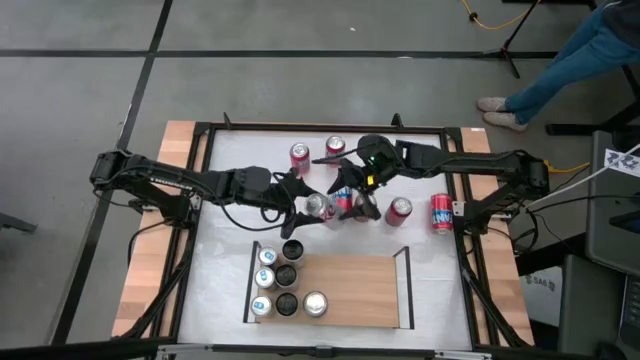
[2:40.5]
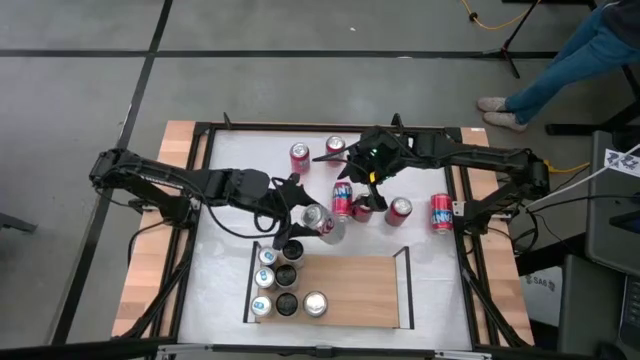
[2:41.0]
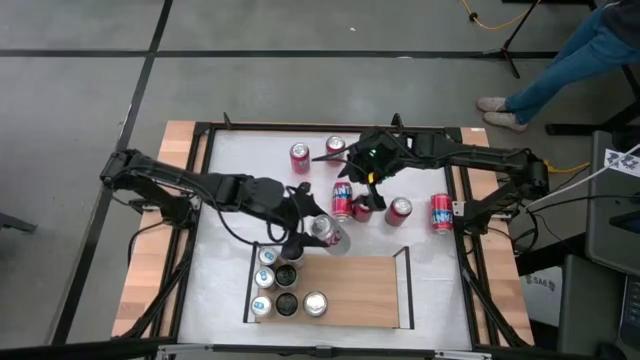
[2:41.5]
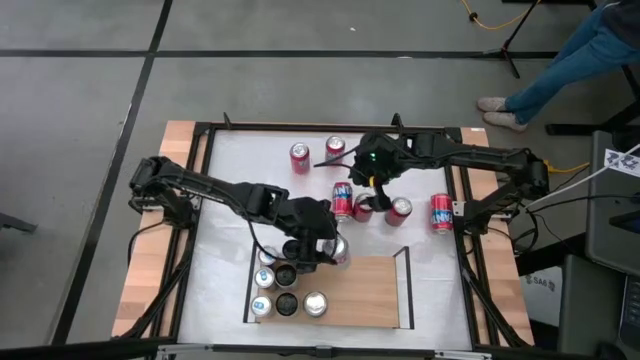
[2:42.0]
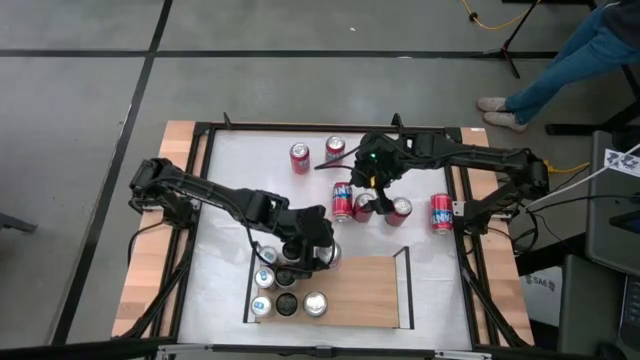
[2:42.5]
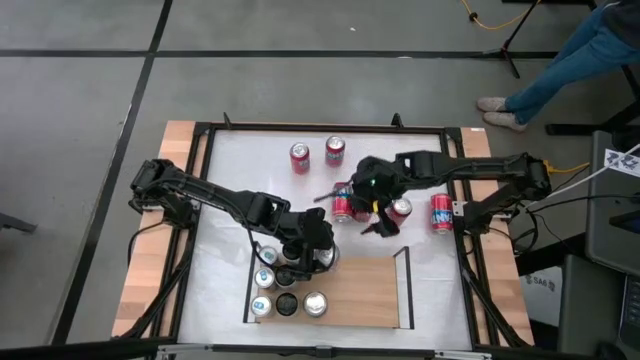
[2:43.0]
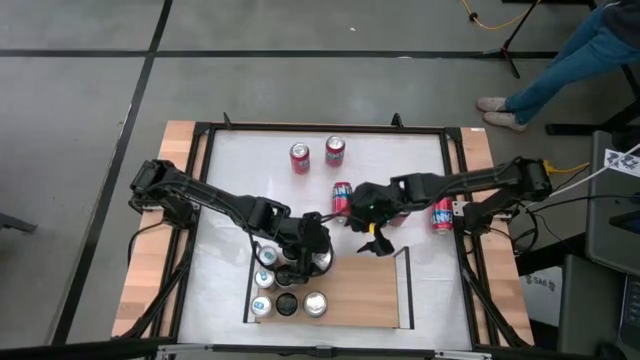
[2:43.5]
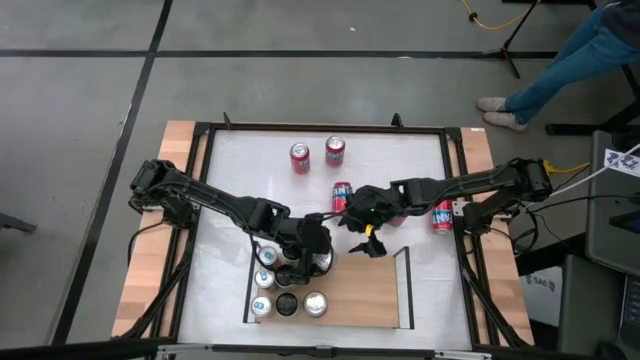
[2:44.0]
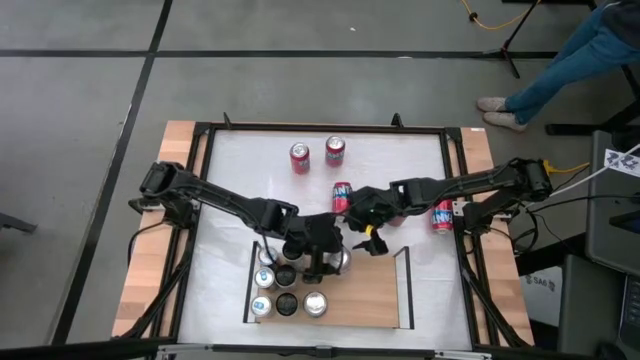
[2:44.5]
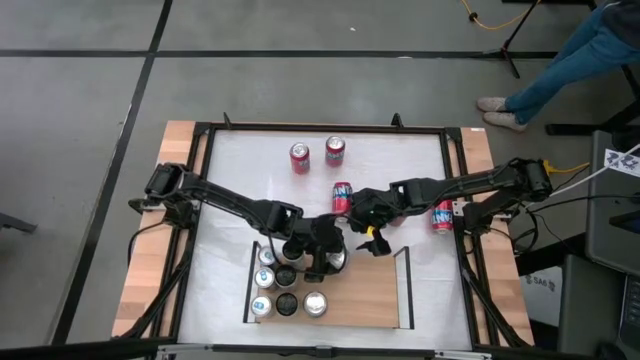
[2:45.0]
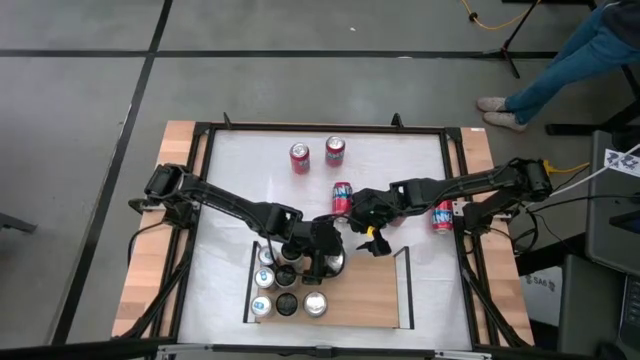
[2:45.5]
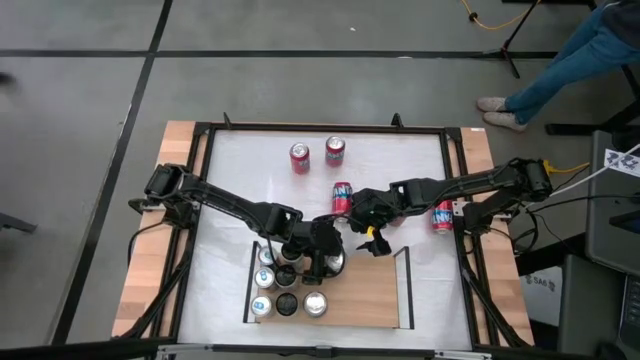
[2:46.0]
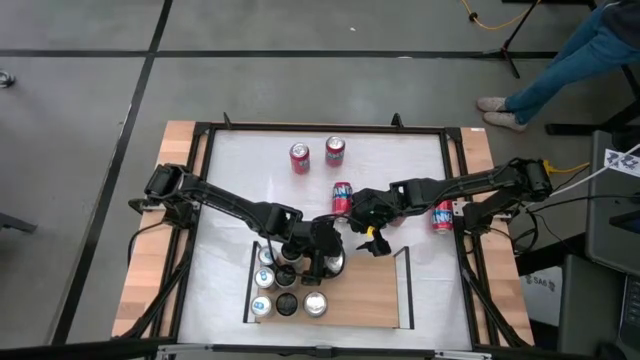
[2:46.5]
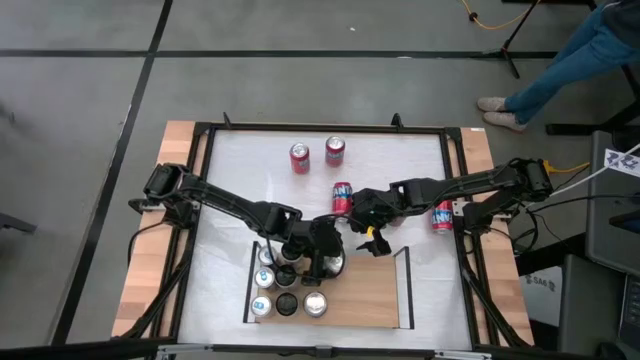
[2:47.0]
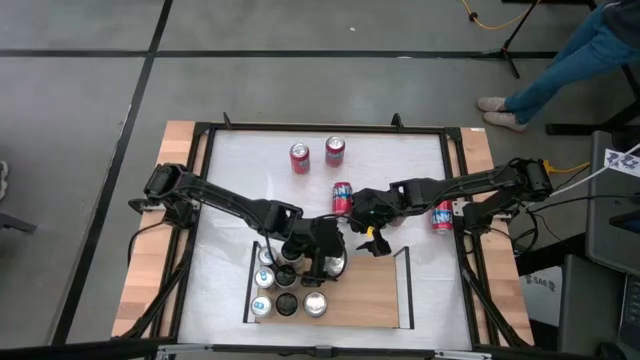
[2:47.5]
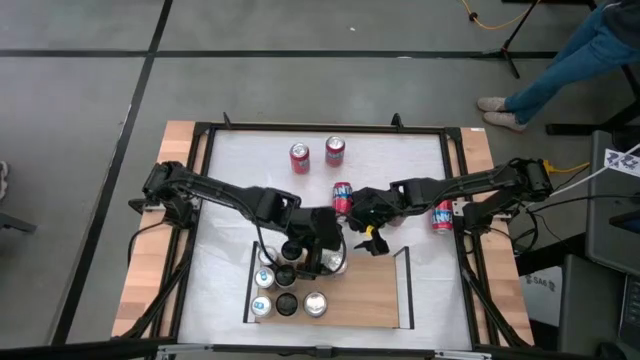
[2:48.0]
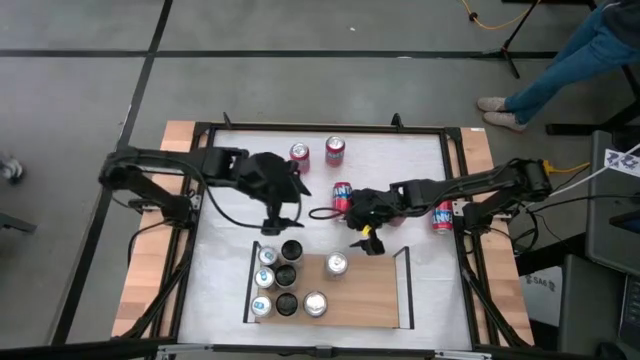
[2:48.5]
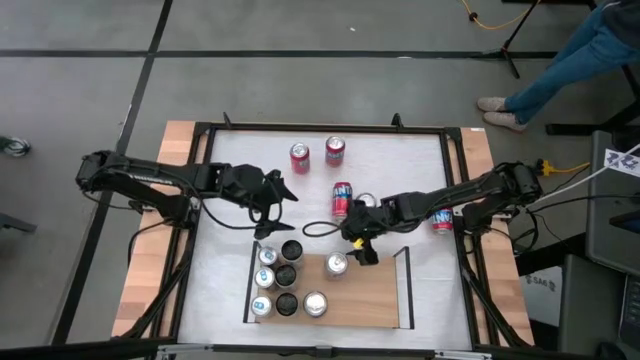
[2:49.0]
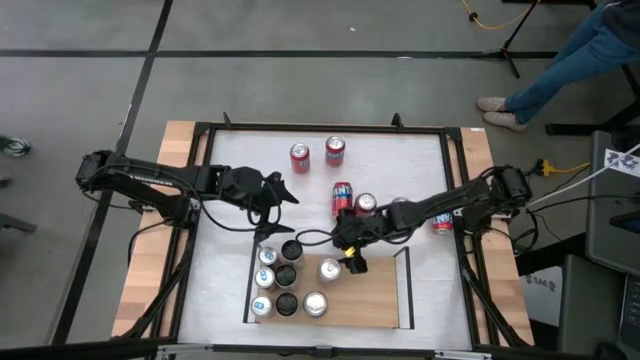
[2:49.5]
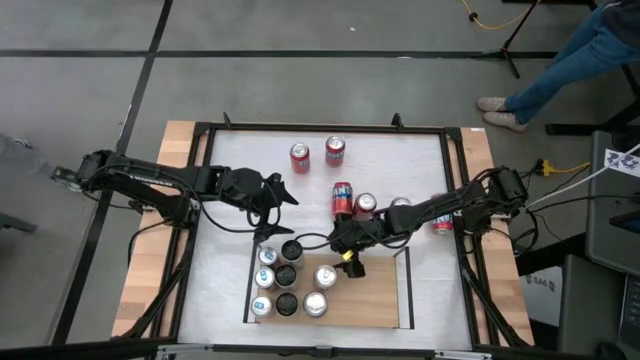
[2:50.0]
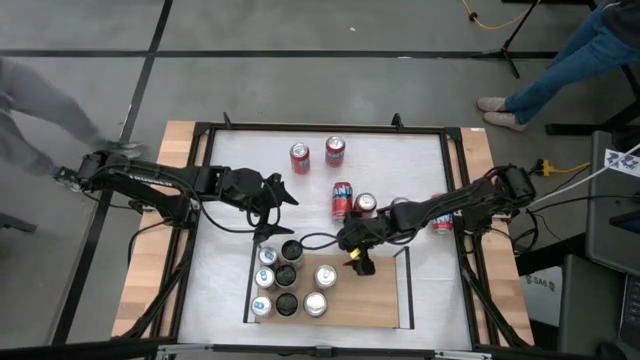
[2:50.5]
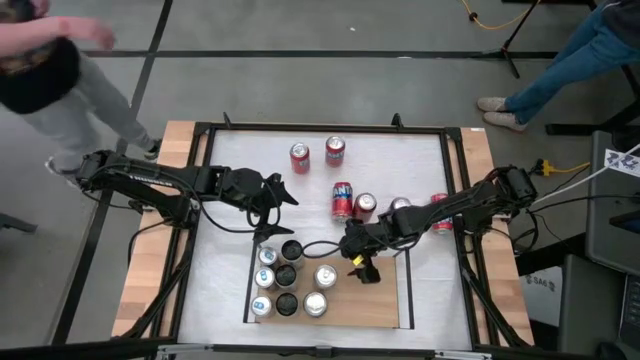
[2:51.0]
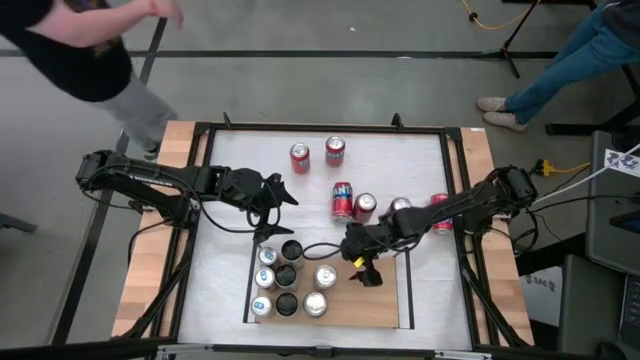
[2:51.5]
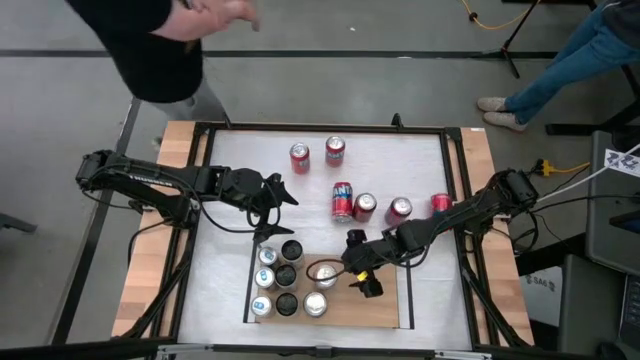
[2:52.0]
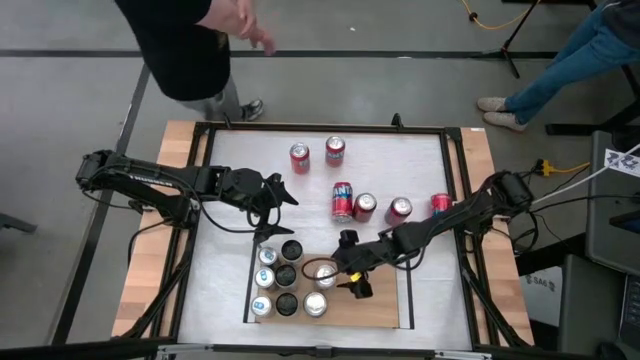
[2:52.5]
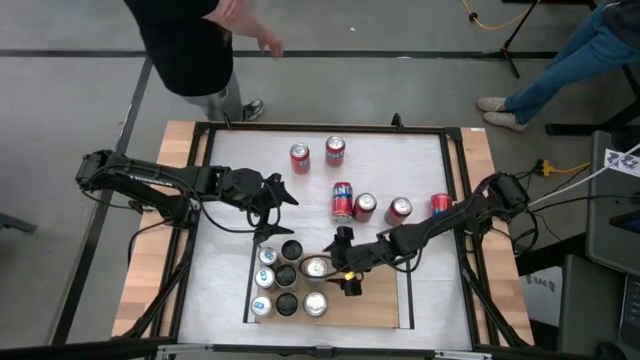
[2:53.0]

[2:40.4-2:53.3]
Task: Place canned beverage on shelf
Put the silver soda can on the shelf aligned with the other silver soda can

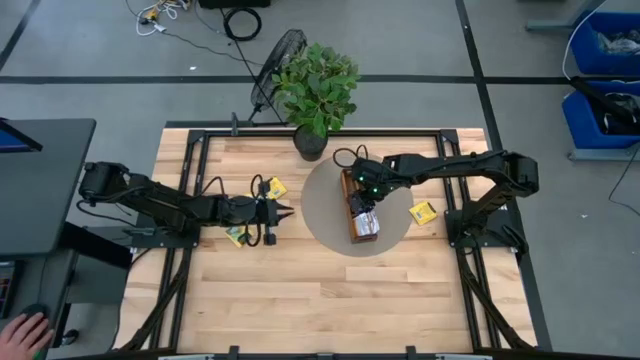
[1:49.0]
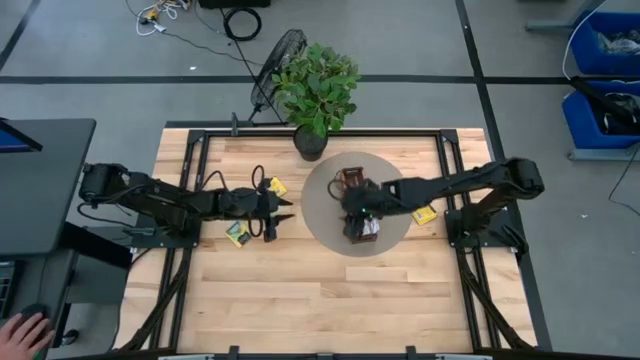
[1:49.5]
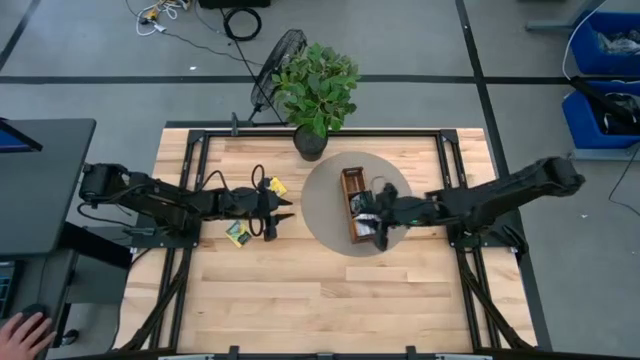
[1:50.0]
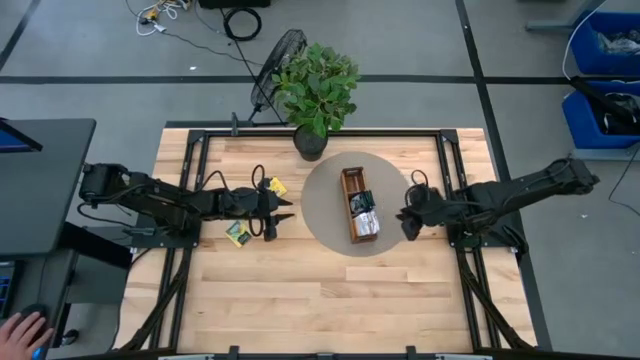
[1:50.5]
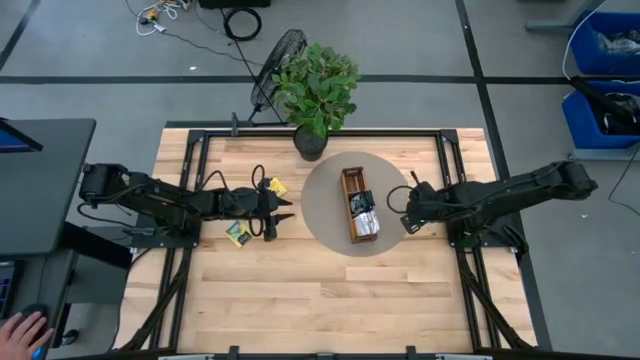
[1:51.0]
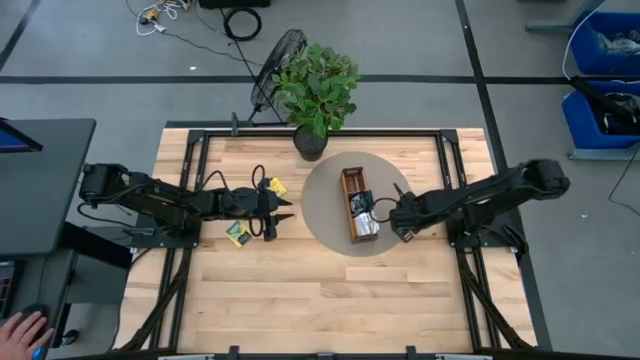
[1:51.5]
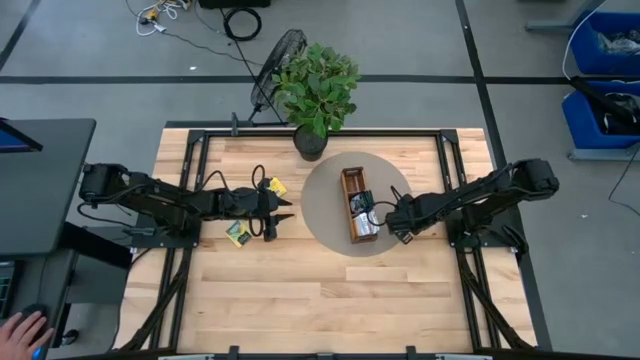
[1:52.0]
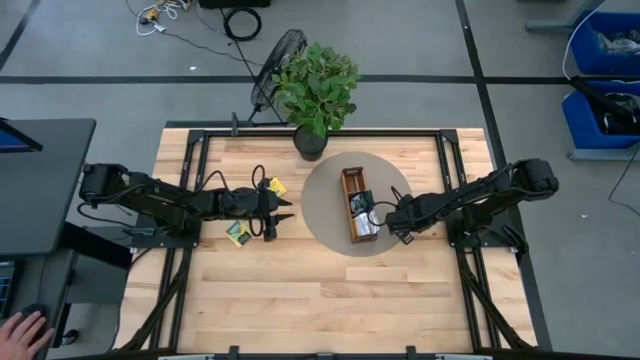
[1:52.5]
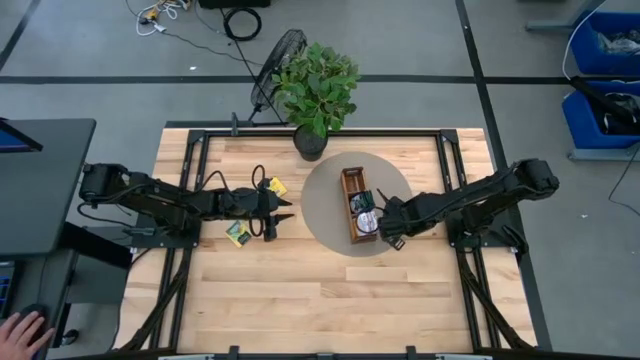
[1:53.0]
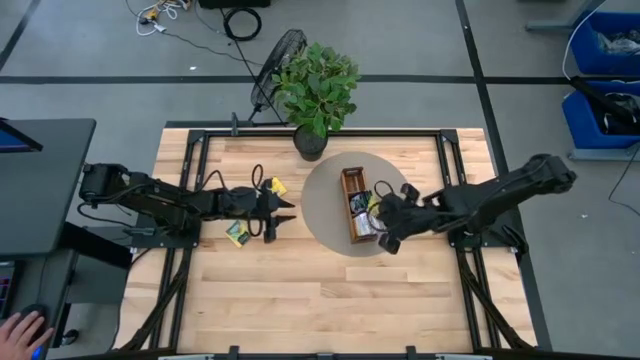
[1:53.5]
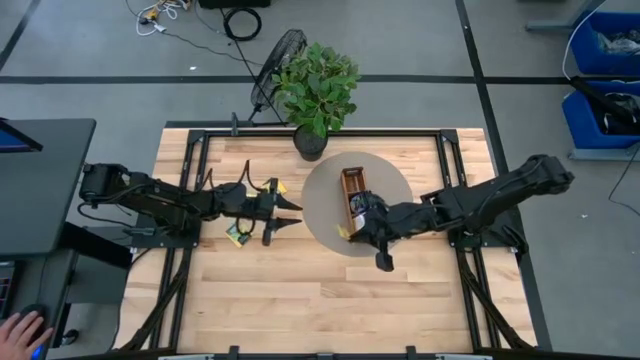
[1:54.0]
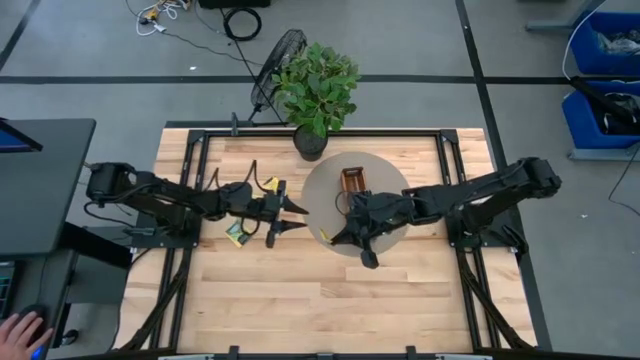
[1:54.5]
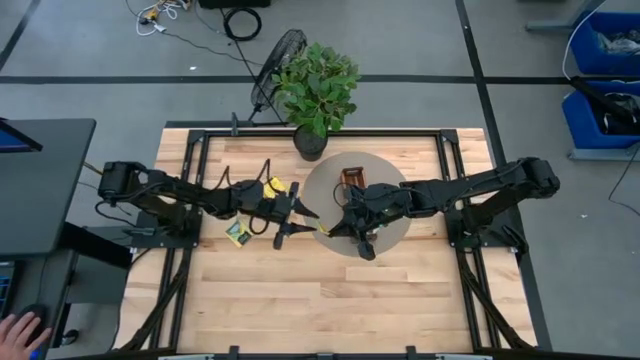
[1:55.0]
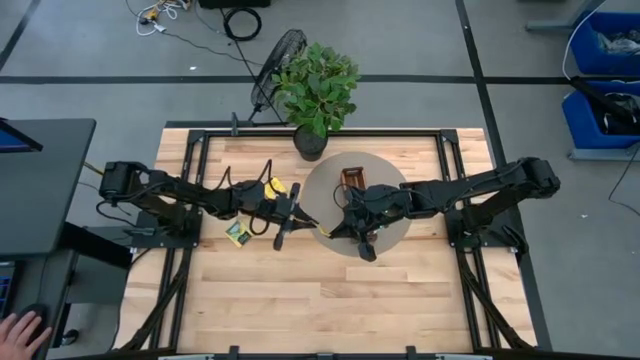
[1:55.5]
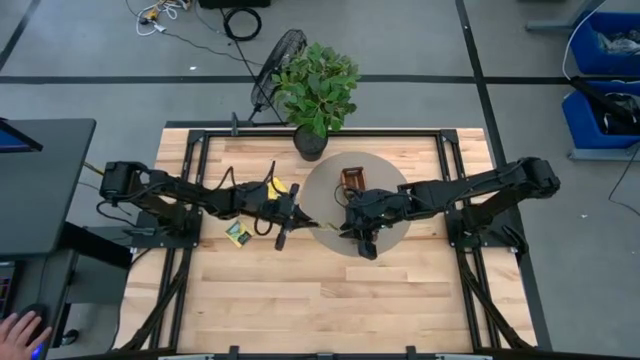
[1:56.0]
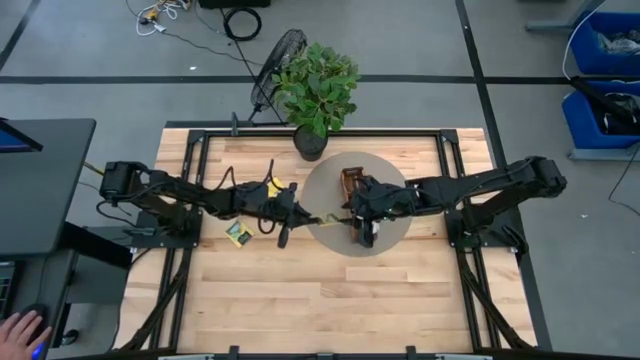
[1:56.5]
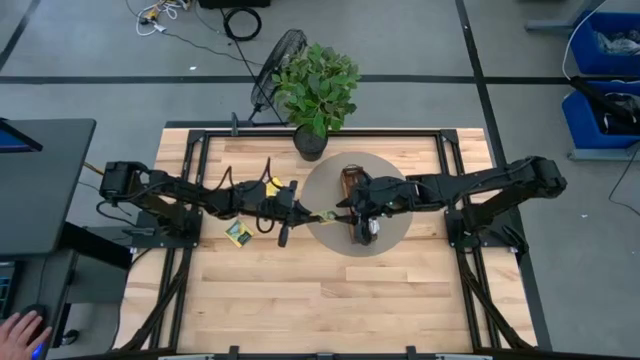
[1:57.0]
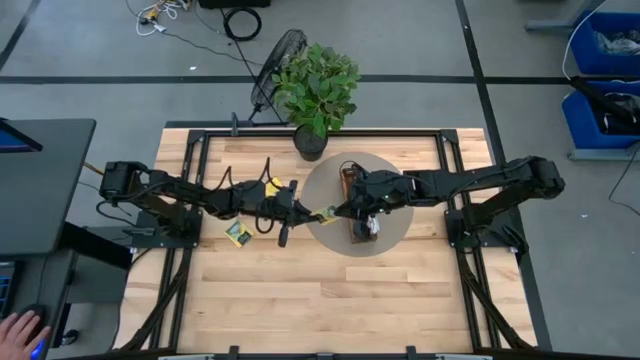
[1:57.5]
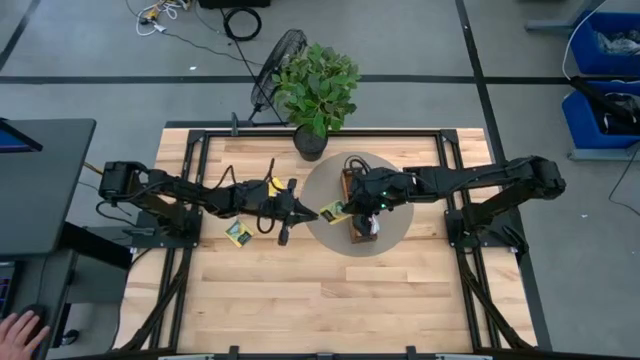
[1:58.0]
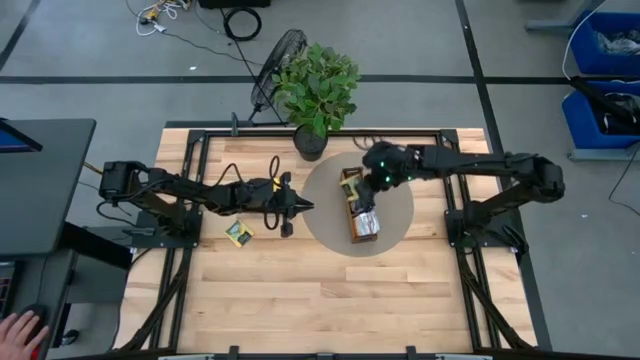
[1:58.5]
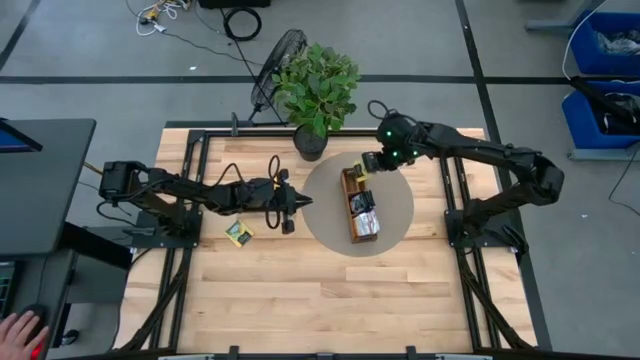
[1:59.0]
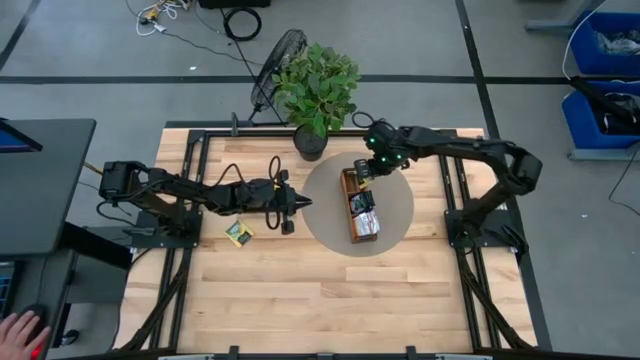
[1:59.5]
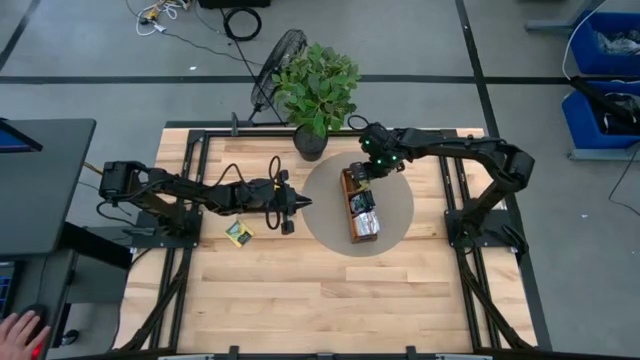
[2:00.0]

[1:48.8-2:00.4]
Task: Pick & Place Tea
Put the yellow tea bag into the top section of the wooden organizer
